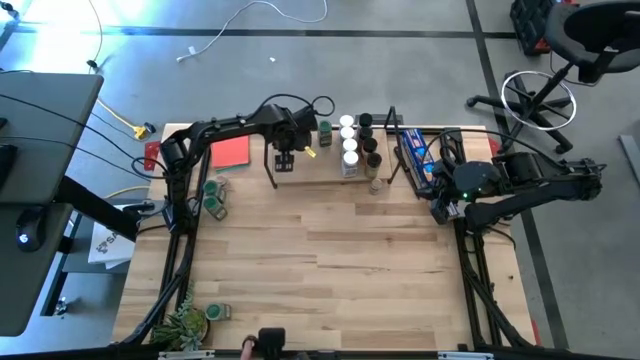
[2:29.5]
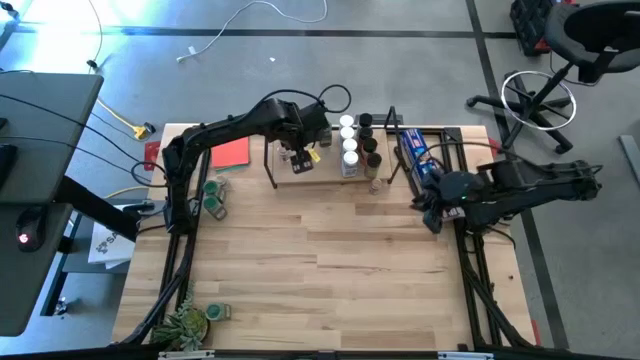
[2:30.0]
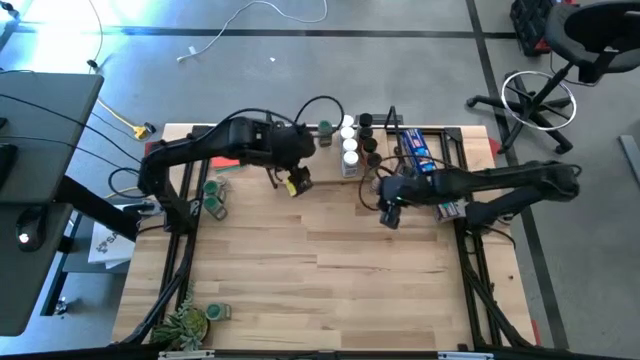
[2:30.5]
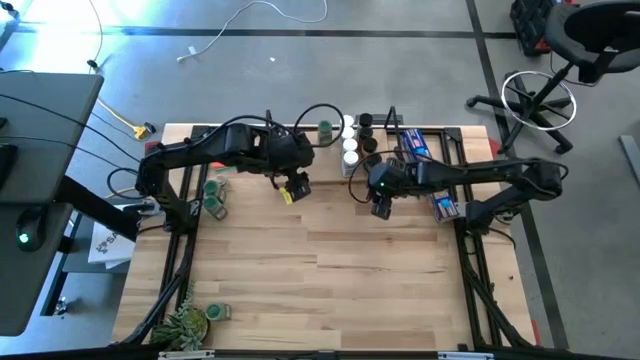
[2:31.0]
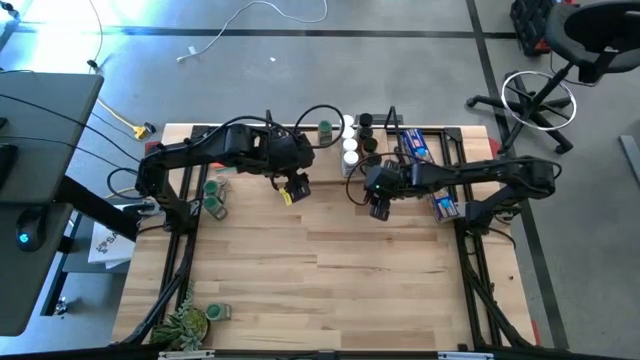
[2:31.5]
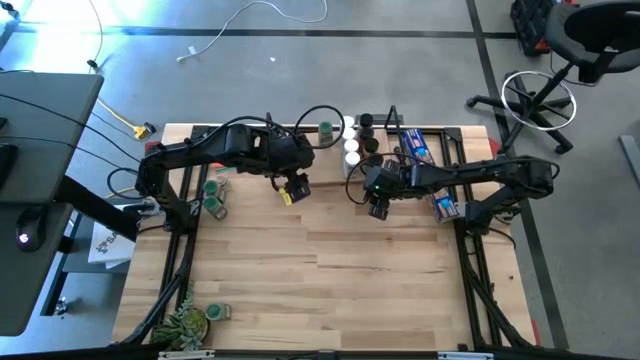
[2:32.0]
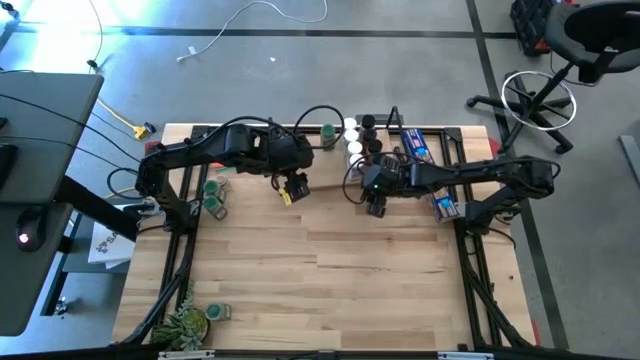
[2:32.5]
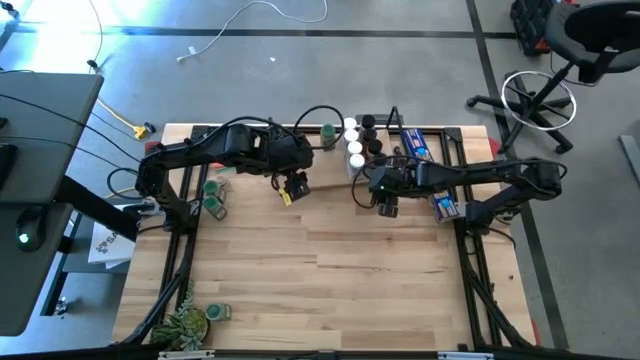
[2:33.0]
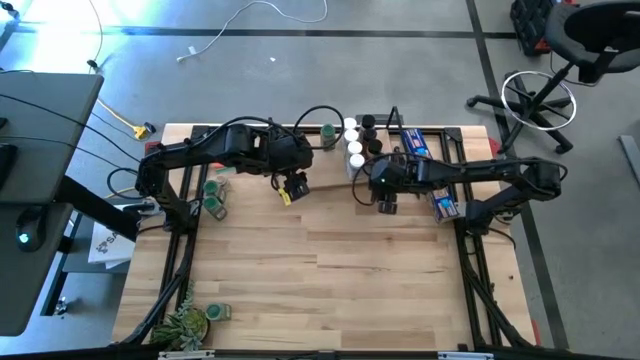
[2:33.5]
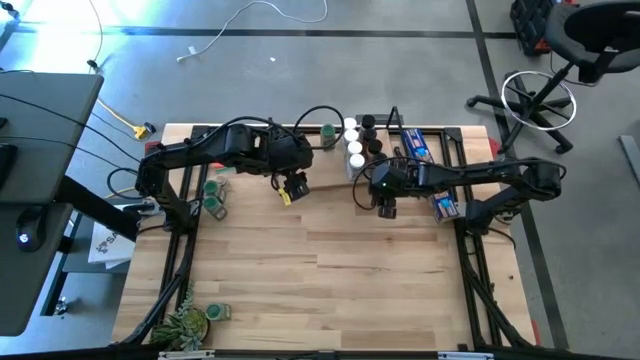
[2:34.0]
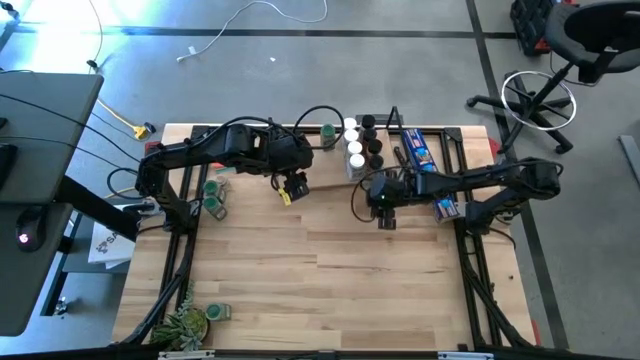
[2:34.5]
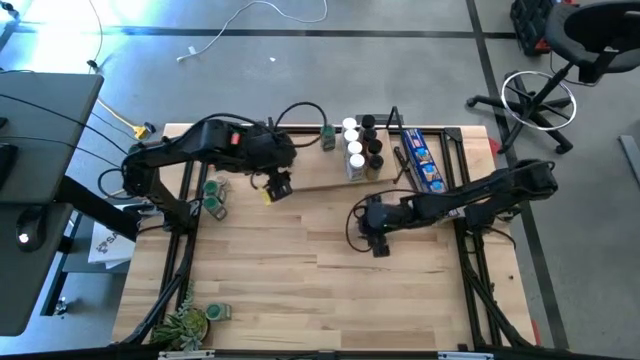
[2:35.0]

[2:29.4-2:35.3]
Task: Shelf spices
Move the right brown seasoning bottle to the center of the table

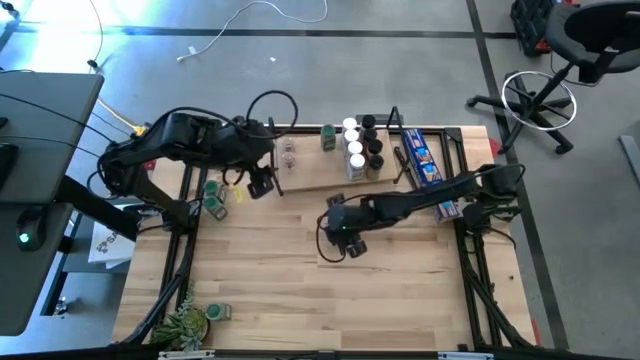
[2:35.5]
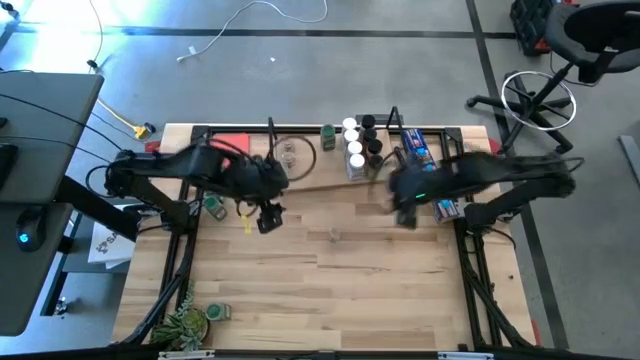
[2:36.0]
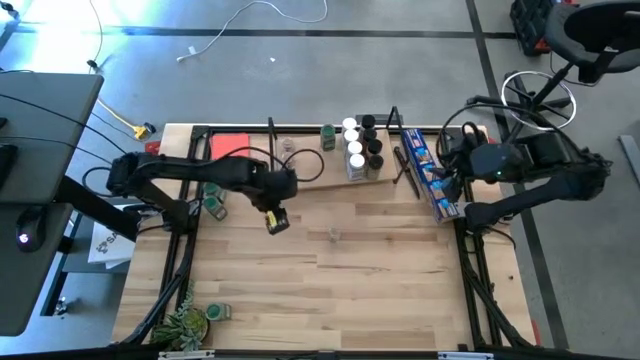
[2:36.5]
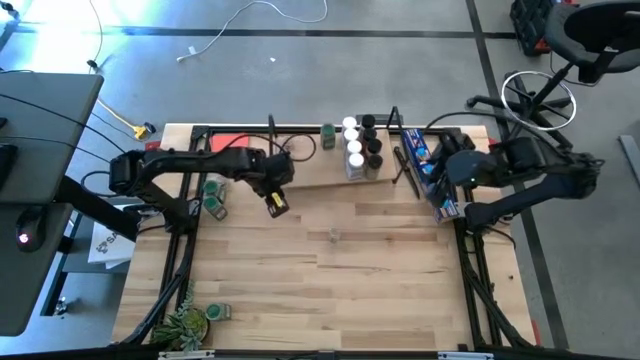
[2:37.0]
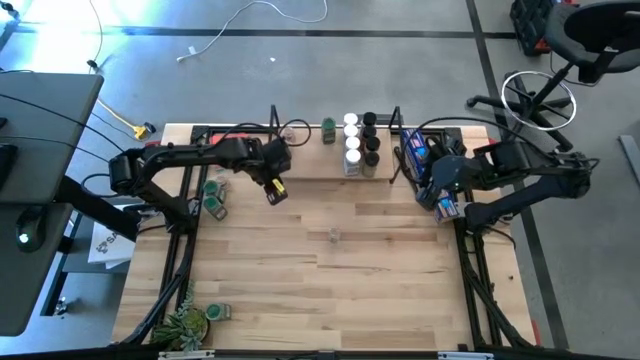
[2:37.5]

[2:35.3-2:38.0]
Adjust the shelf

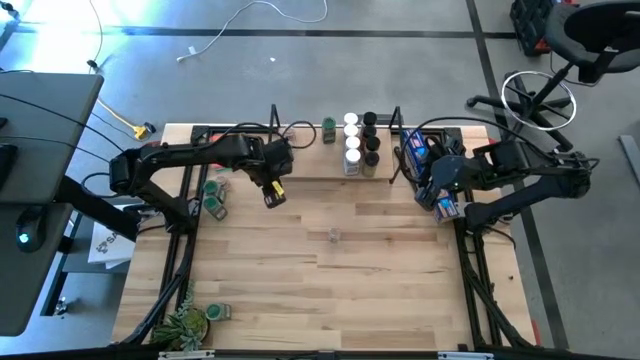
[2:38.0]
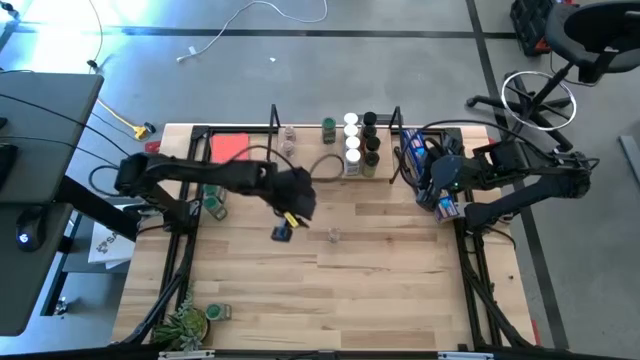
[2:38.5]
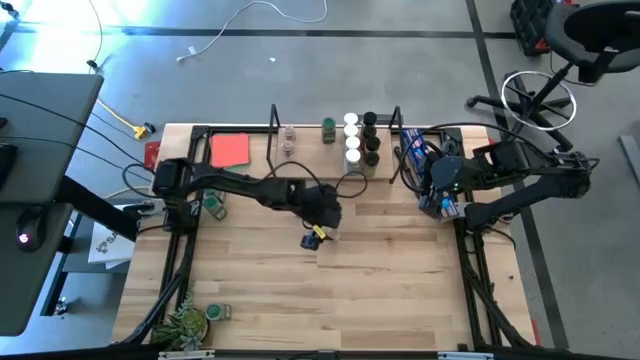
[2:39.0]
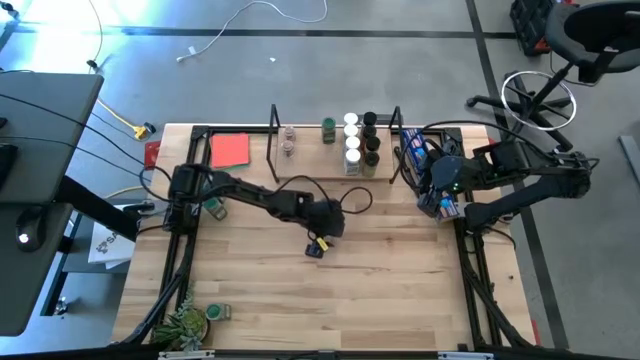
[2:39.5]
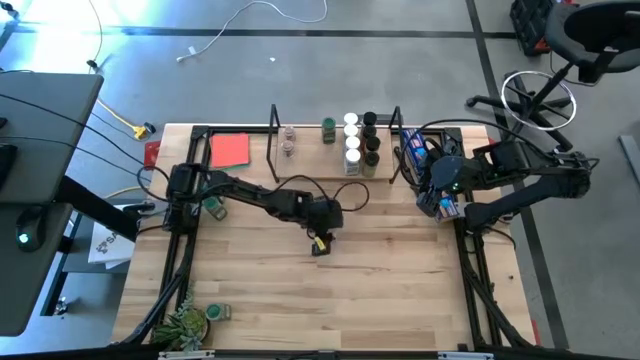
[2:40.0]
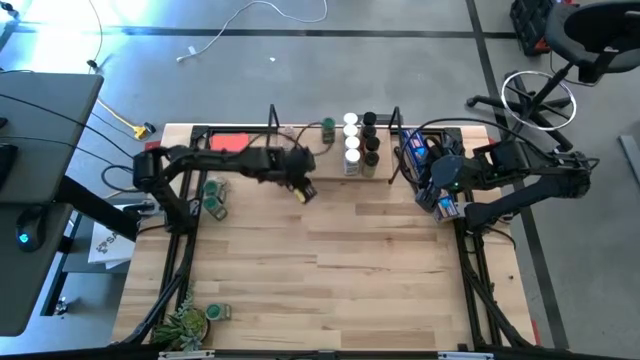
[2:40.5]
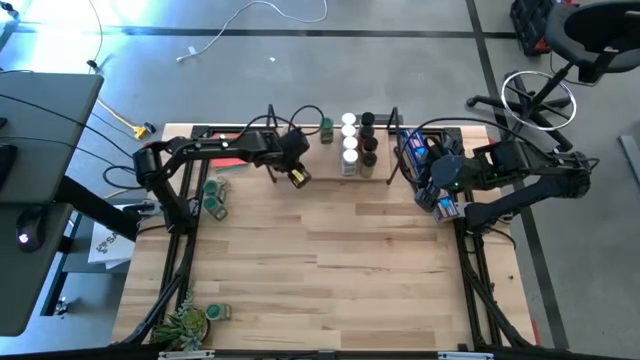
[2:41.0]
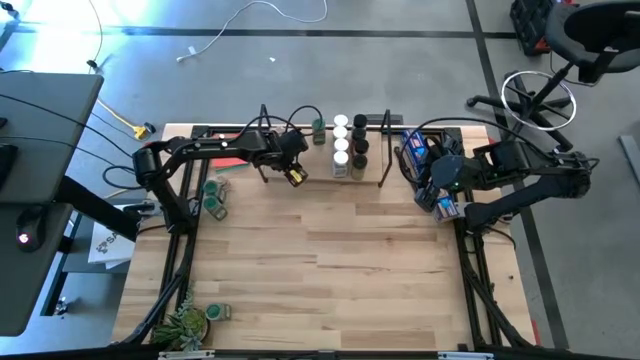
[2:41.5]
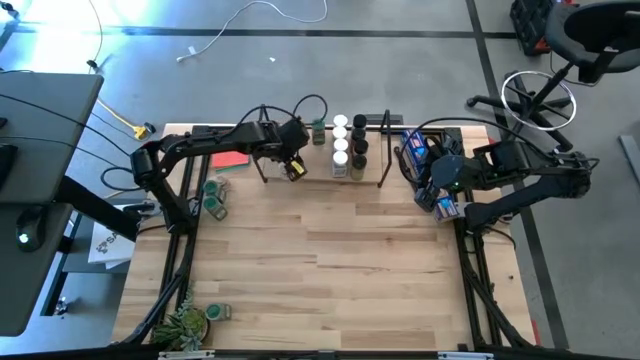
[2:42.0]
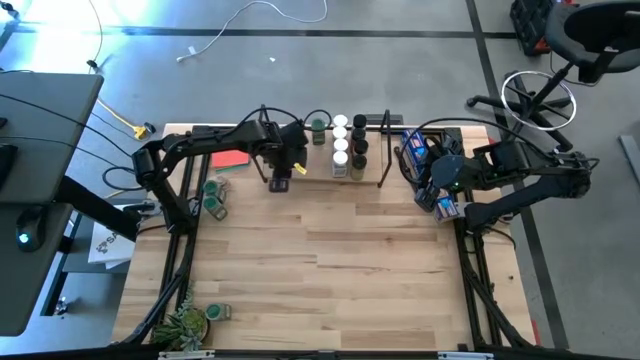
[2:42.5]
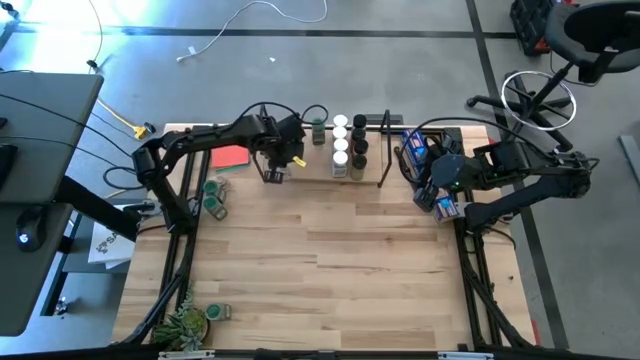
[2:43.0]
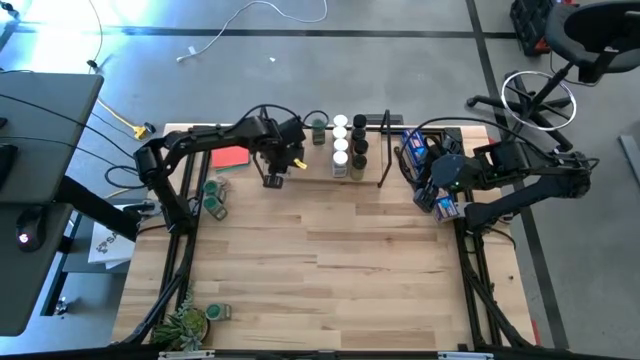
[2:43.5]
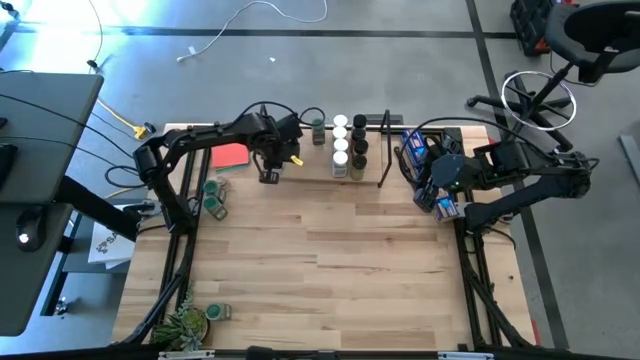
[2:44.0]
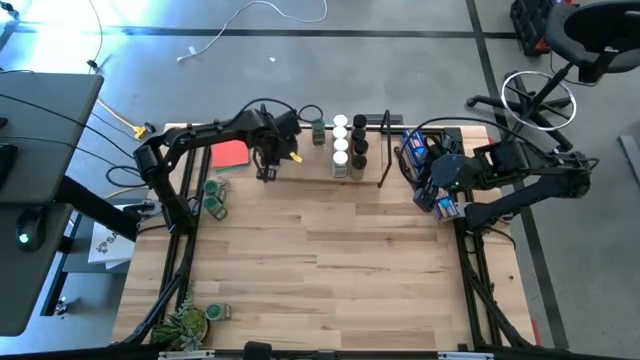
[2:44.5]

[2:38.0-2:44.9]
Put the right brown seasoning bottle on the shelf aligned with the other brown seasoning bottles

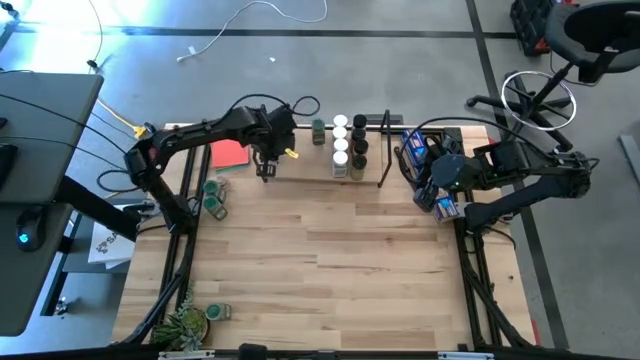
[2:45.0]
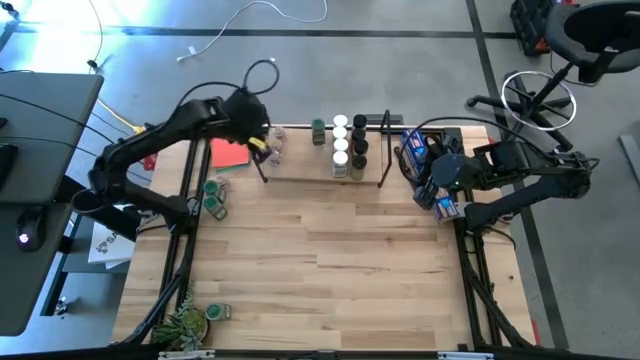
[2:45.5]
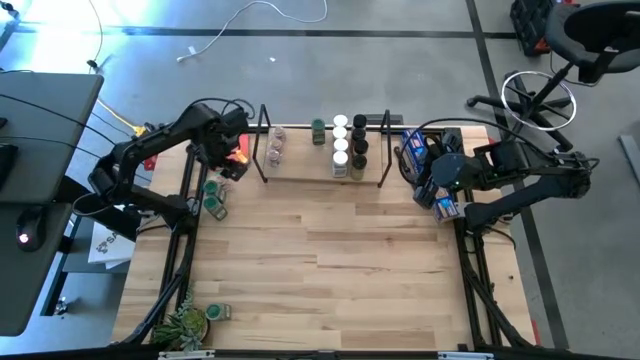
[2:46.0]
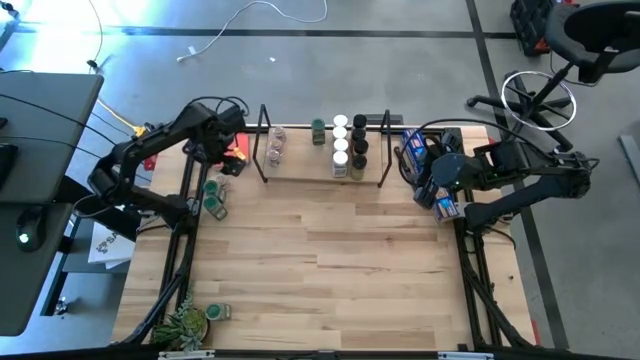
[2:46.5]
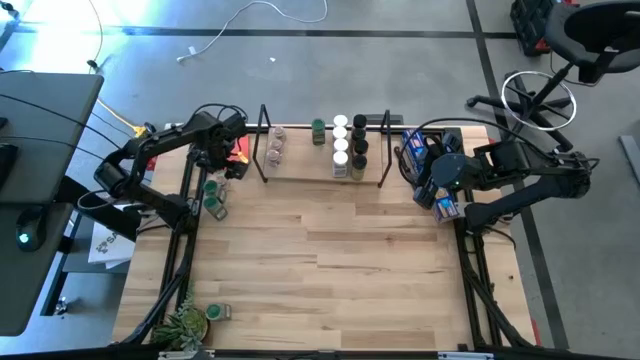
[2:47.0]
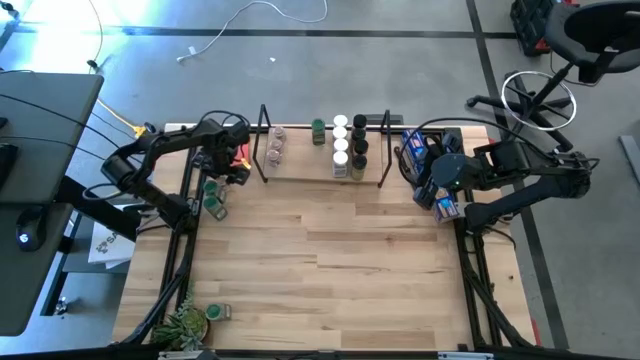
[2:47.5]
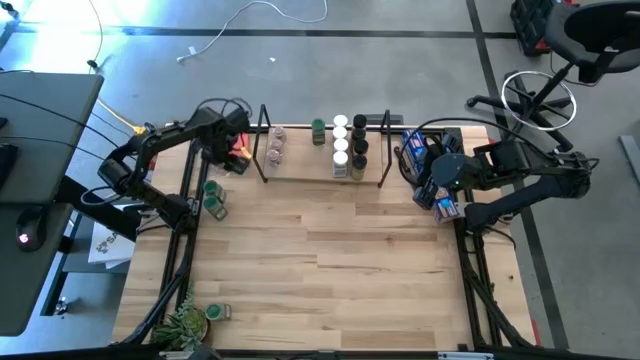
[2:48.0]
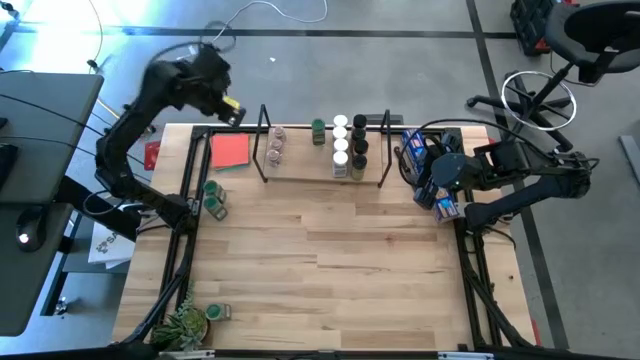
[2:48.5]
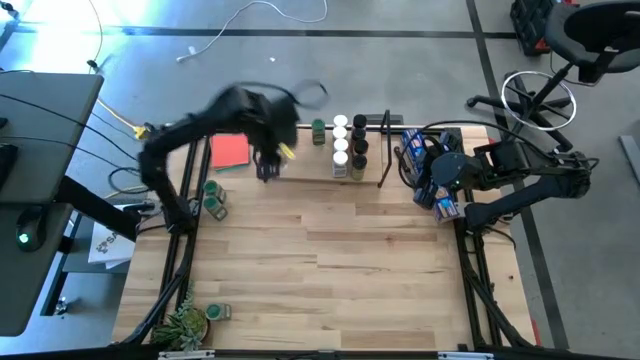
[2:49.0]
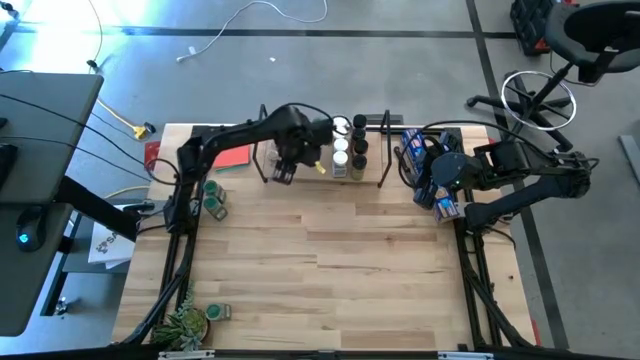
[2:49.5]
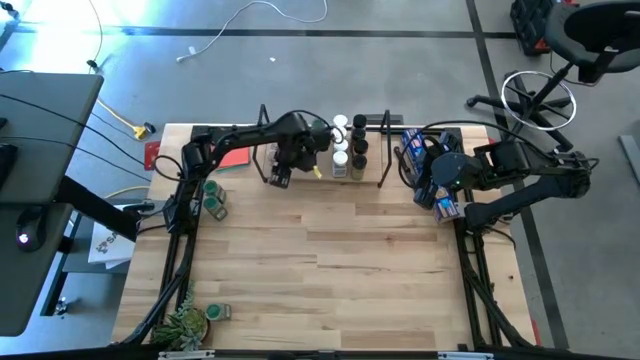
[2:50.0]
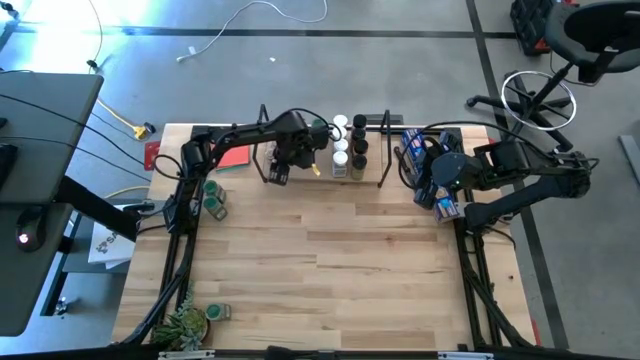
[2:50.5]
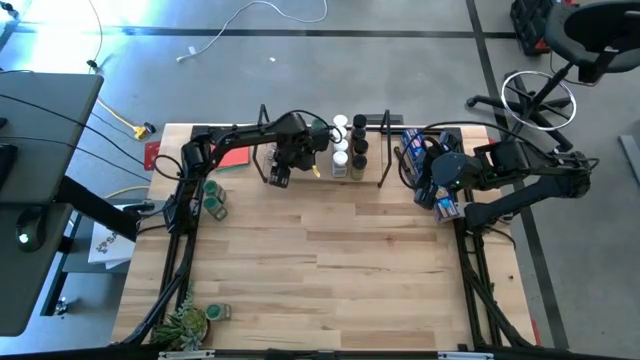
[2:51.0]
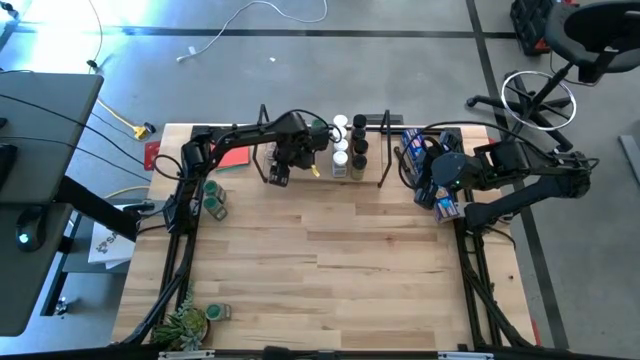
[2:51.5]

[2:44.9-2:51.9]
Put the brown seasoning bottle on the shelf aligned with the other brown seasoning bottles
